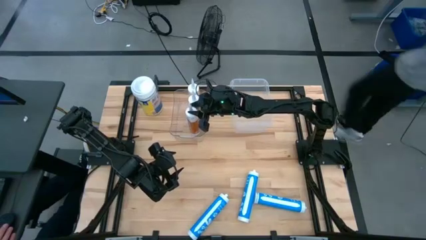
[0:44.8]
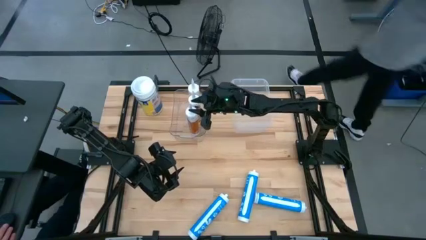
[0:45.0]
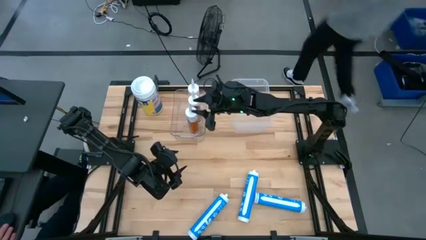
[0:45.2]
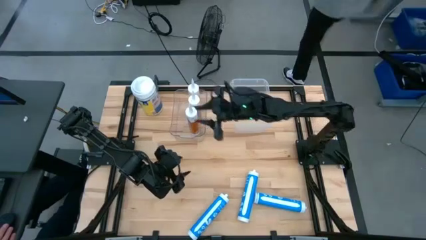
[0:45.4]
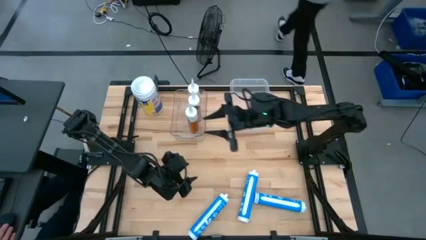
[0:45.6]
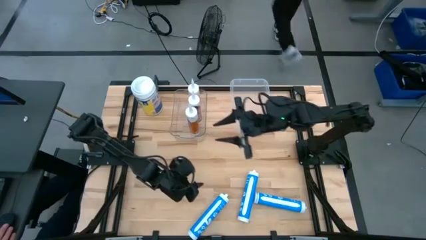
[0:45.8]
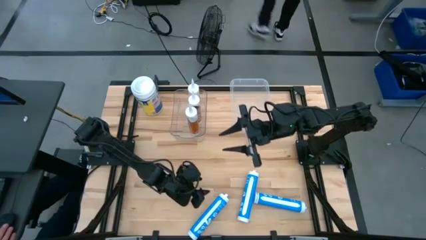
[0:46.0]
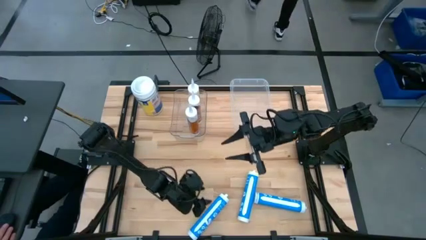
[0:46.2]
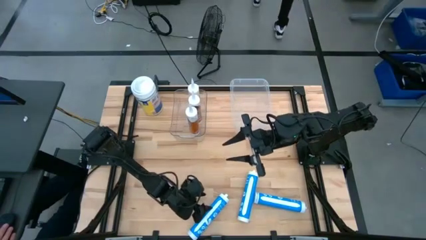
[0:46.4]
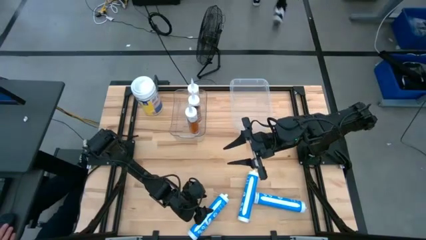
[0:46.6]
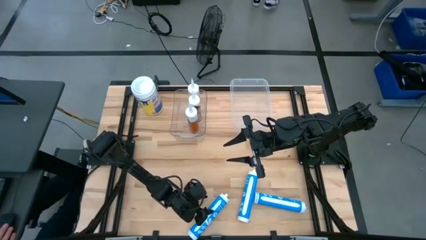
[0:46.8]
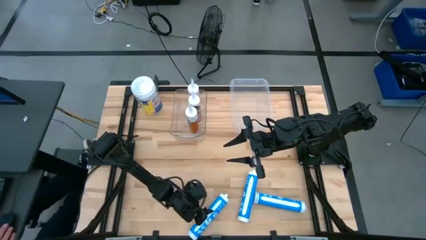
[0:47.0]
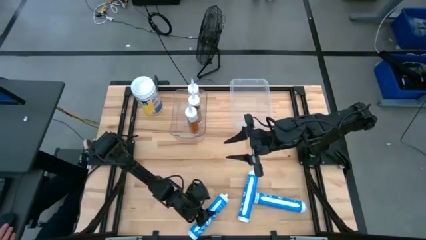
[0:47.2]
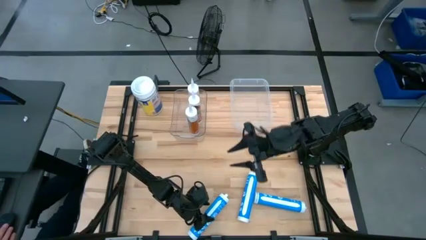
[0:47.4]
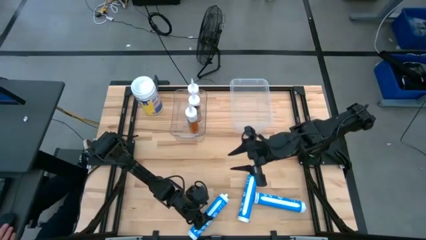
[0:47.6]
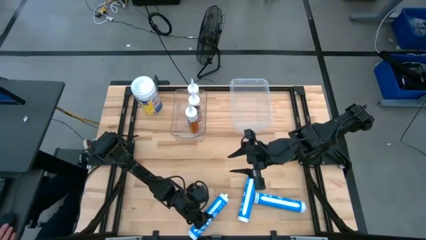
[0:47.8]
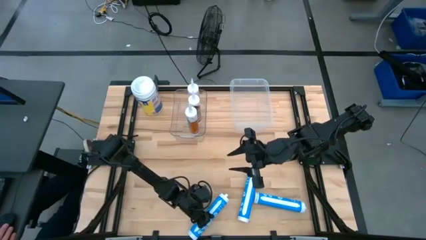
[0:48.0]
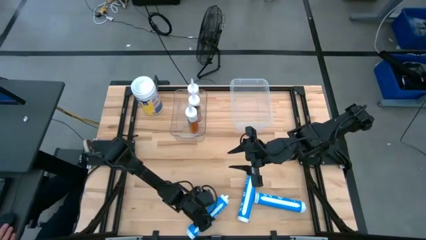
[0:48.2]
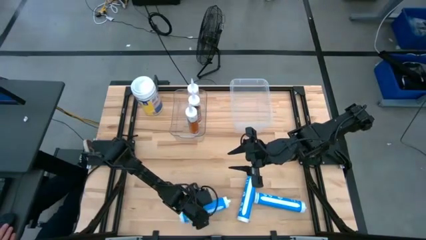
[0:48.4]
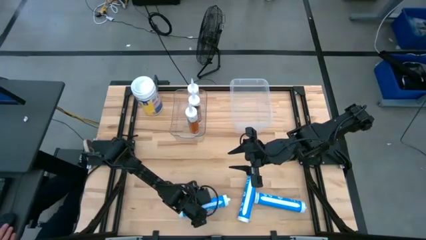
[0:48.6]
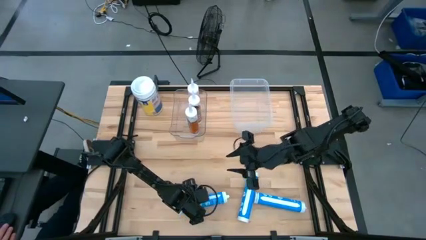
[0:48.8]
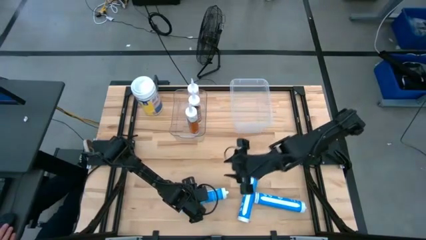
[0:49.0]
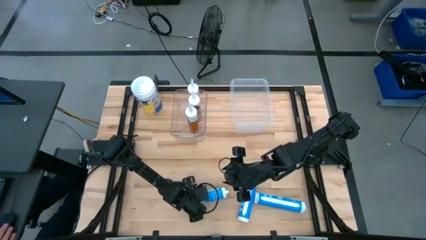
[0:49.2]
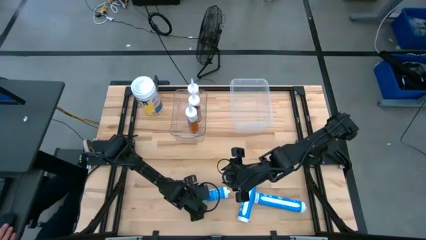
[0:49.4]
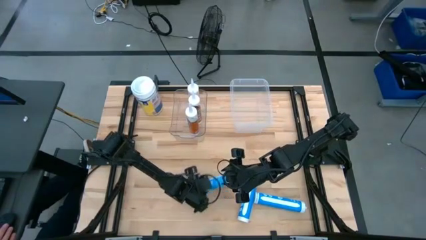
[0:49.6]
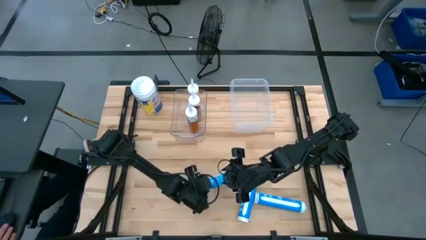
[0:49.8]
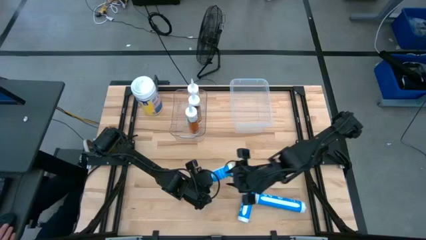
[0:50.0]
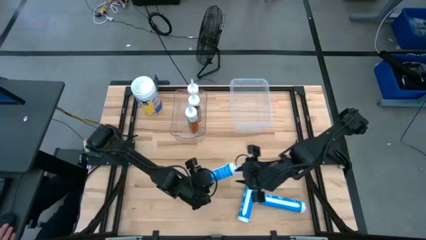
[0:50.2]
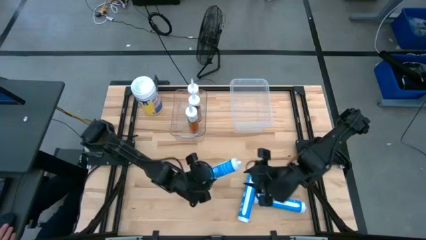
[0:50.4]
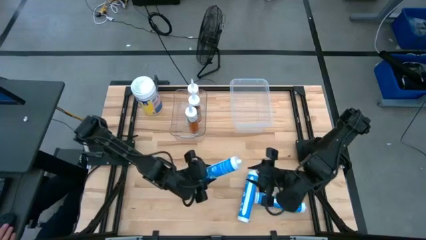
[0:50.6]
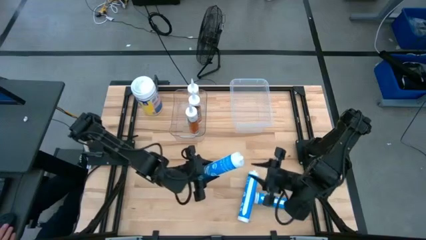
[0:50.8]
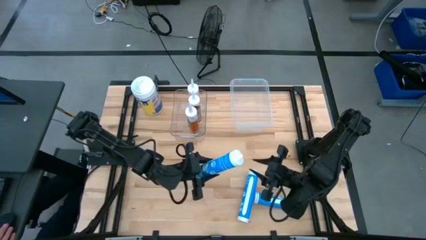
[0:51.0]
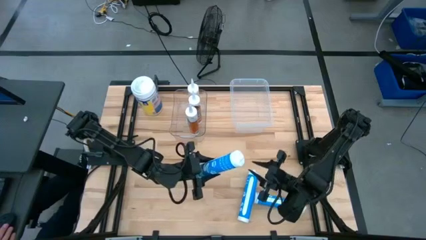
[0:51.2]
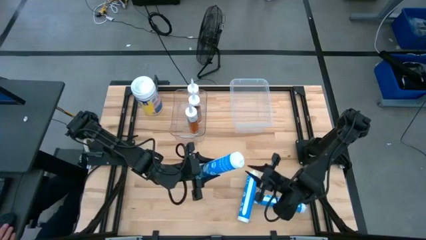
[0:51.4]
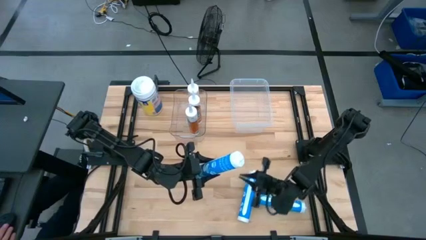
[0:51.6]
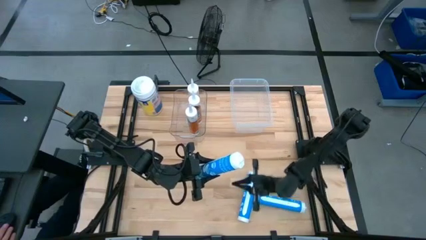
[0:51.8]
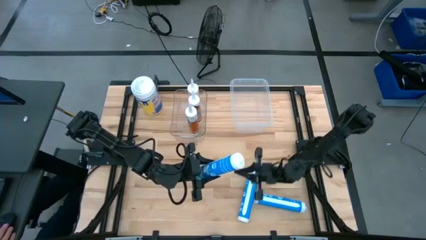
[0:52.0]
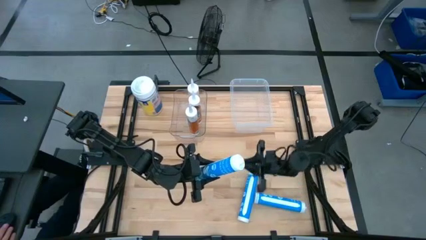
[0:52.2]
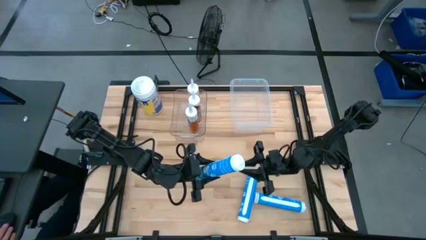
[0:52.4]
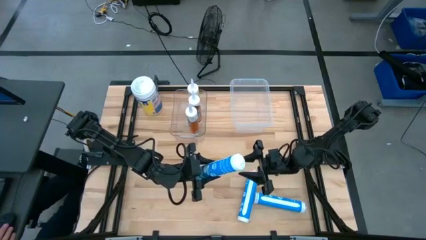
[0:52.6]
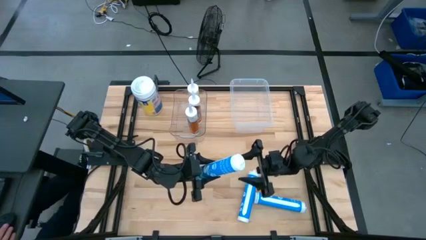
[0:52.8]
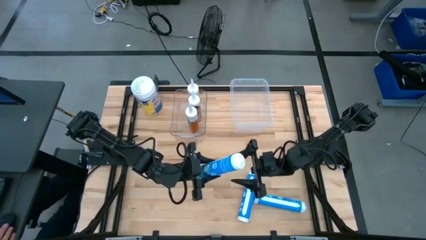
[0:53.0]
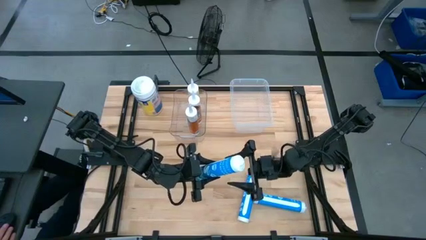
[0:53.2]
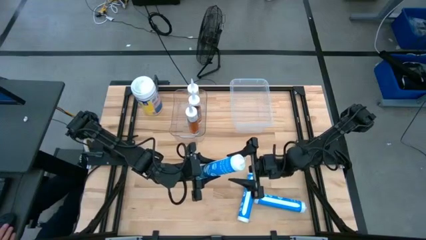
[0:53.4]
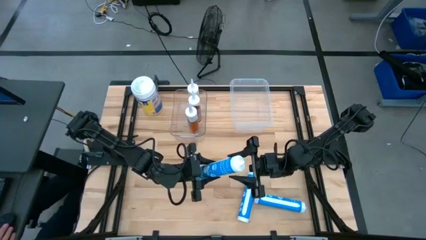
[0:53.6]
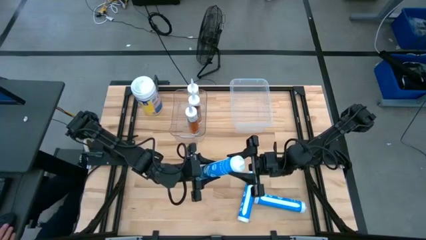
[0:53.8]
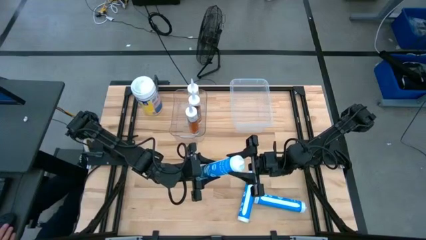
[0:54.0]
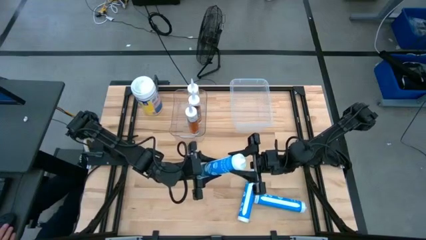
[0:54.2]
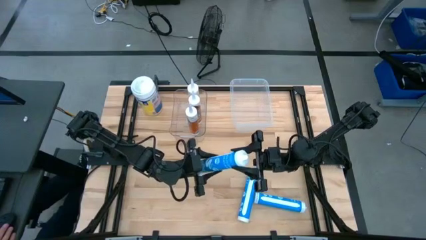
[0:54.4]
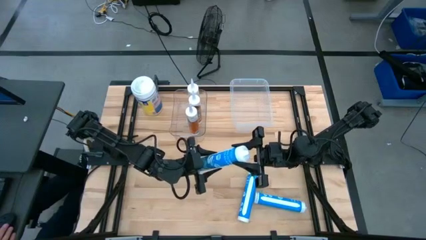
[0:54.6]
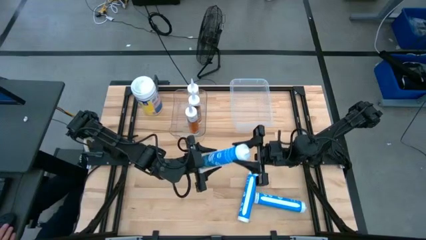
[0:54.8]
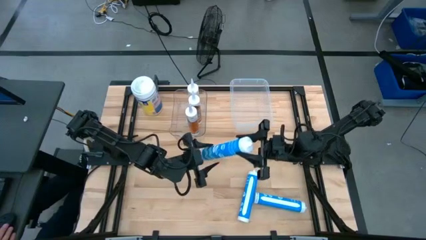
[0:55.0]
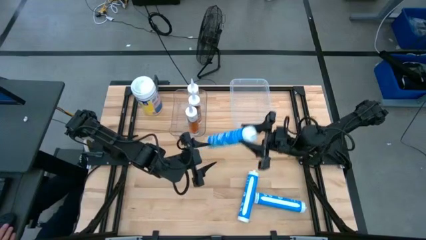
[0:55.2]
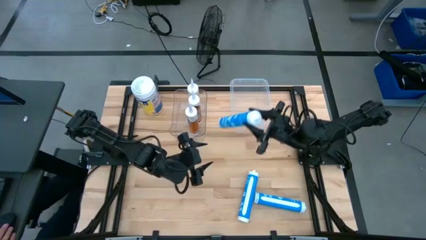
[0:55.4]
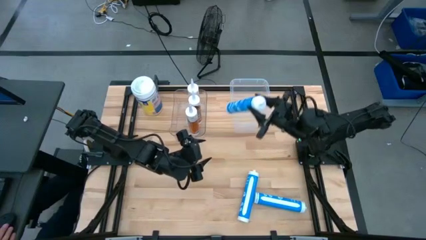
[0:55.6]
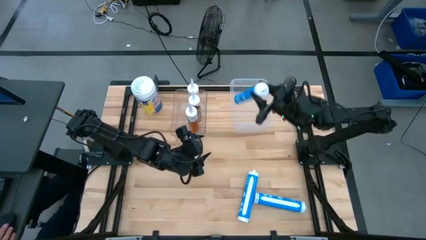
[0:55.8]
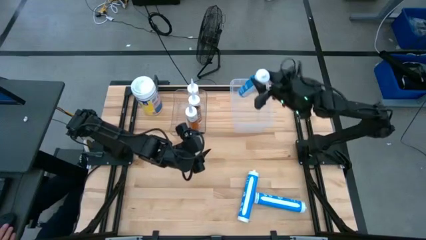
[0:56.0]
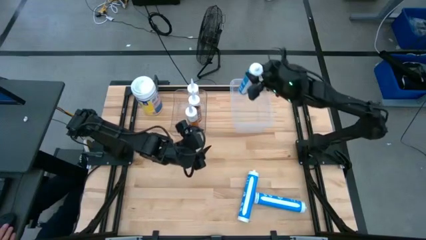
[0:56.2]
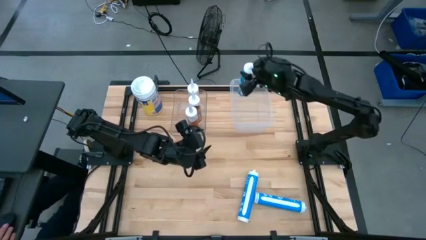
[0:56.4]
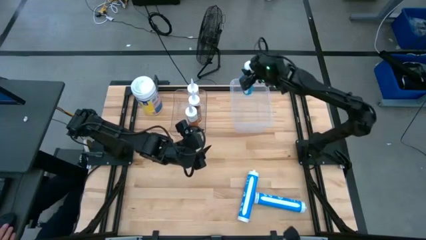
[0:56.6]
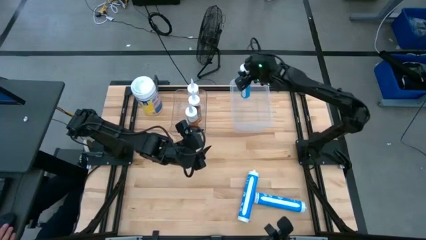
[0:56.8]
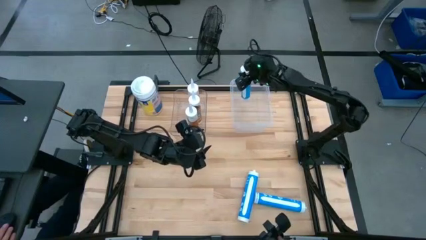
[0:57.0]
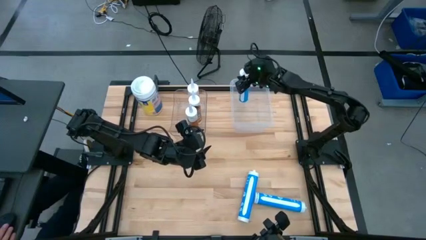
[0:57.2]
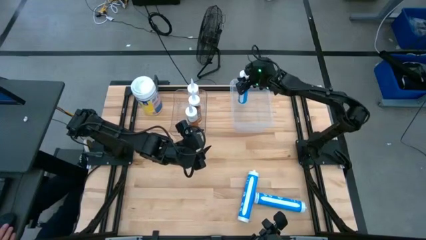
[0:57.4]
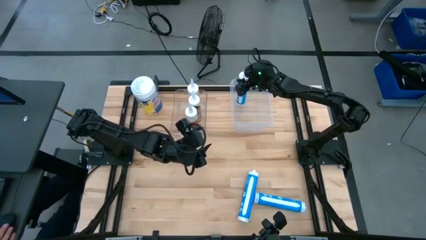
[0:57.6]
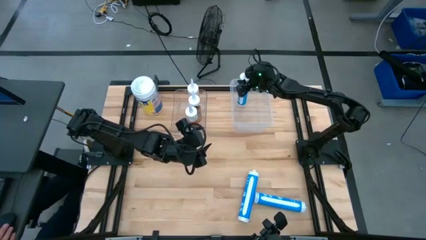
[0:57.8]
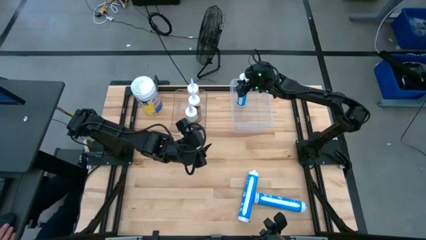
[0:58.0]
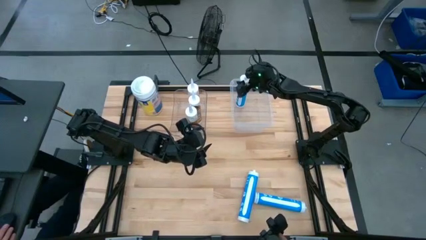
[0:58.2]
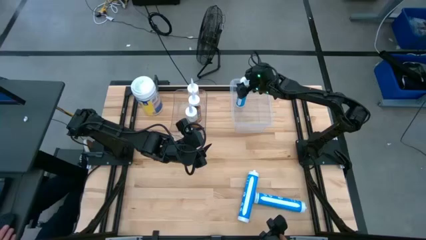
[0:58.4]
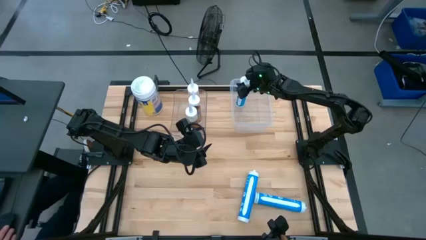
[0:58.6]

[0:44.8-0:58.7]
Task: Pick & place silicon tubes, Sealant and Lysol wipes
Put the left blue sealant into the right transparent bin
